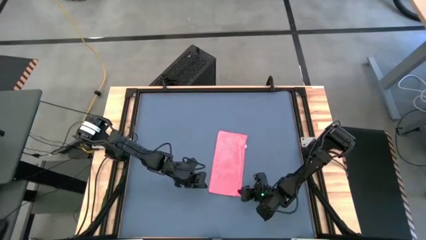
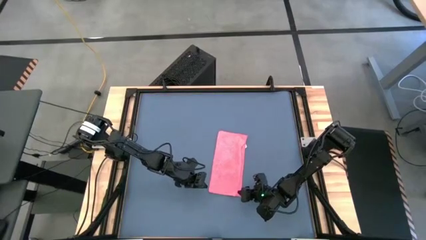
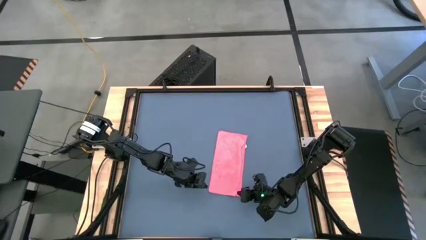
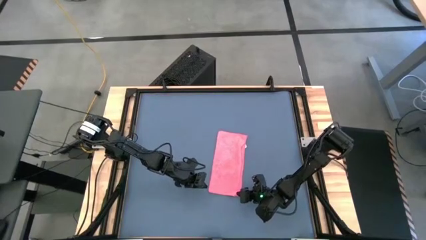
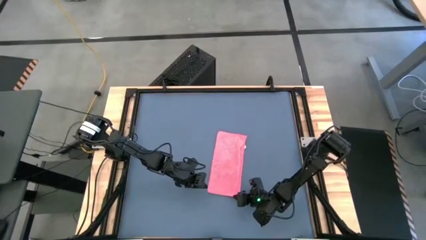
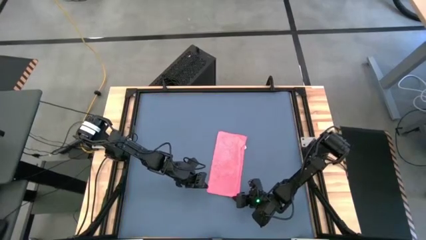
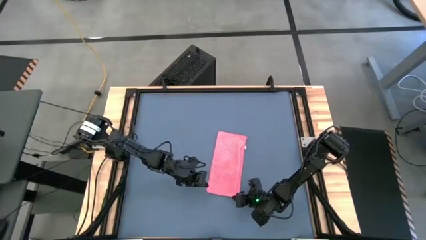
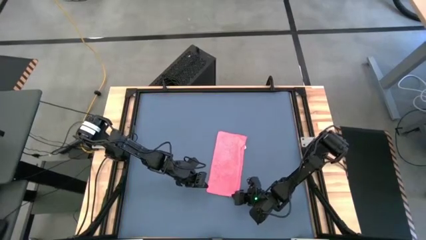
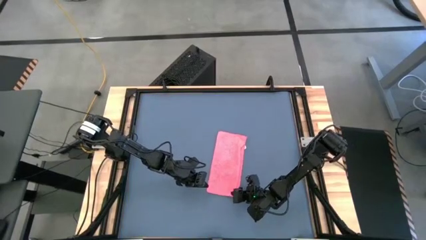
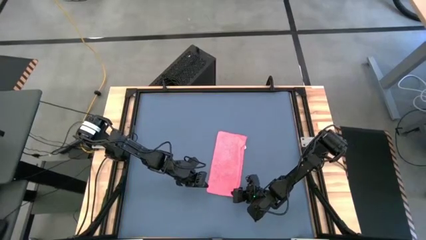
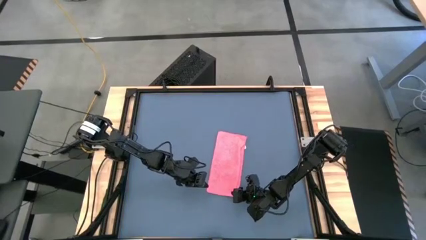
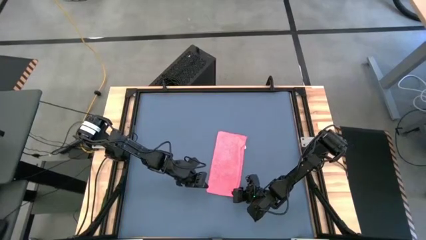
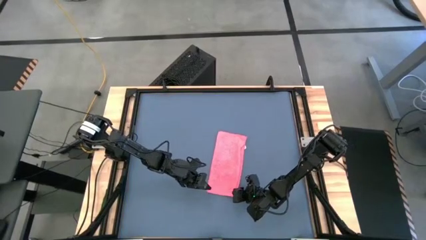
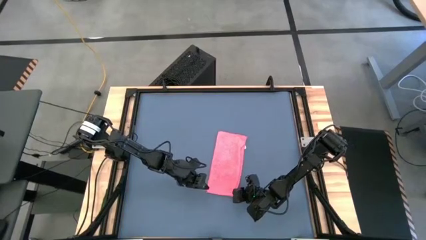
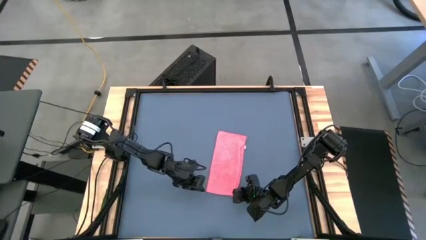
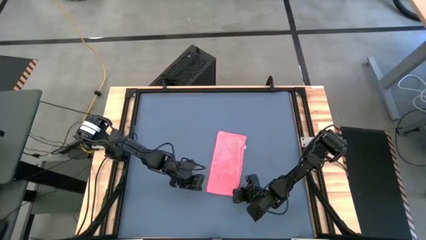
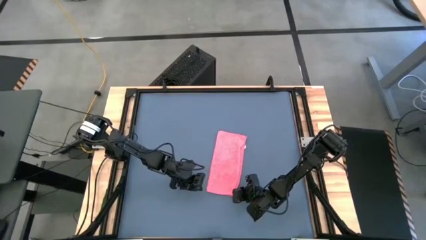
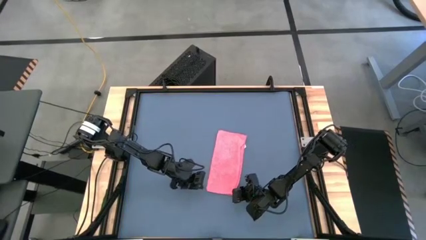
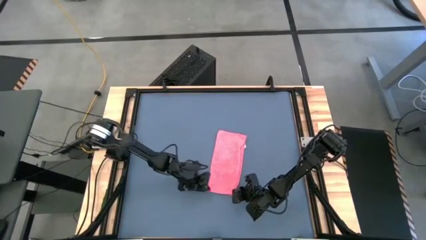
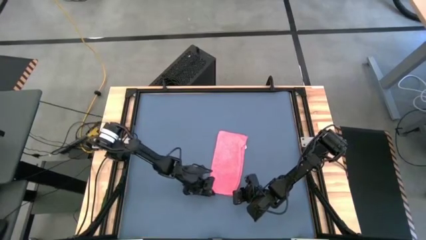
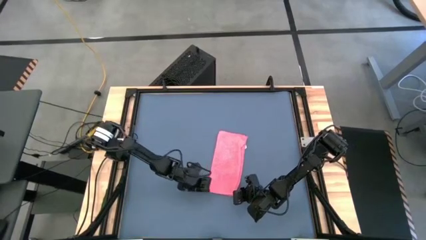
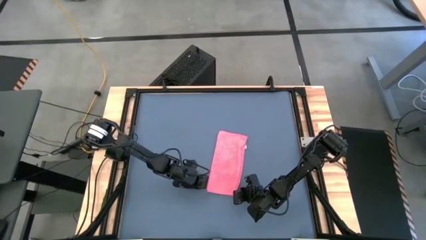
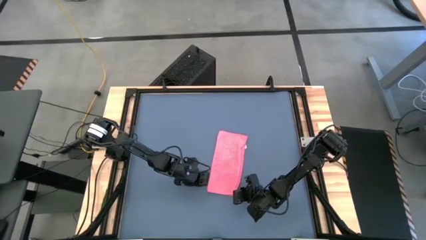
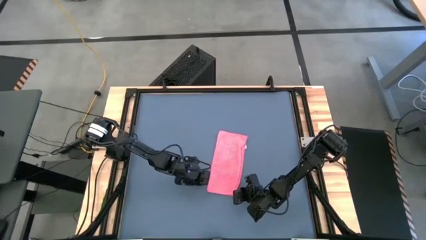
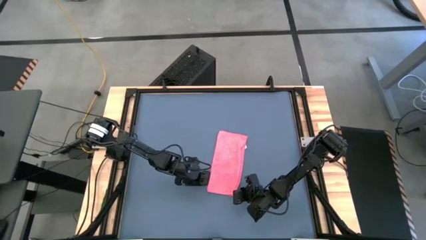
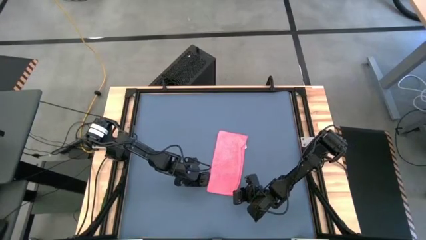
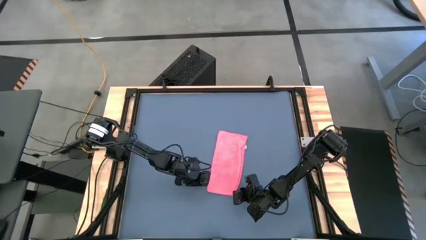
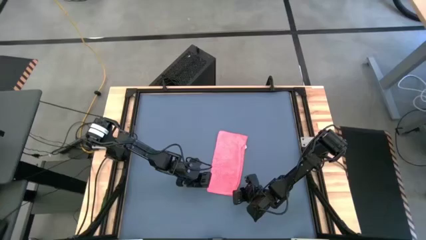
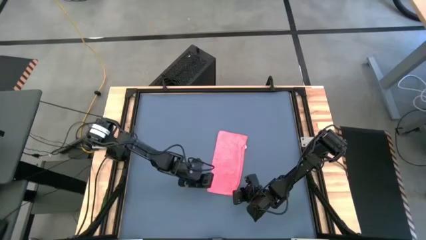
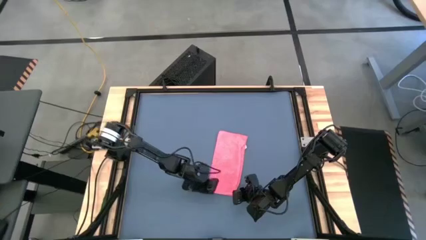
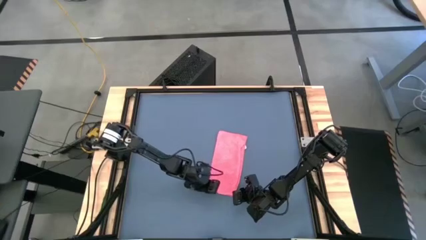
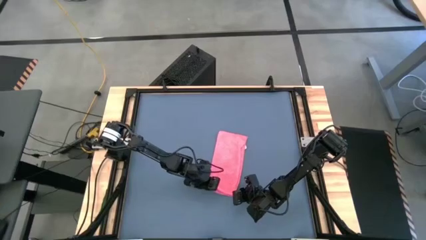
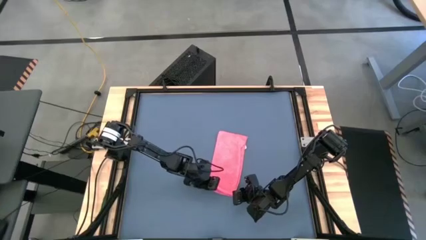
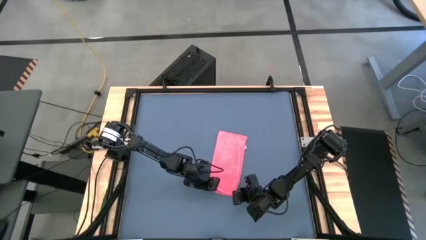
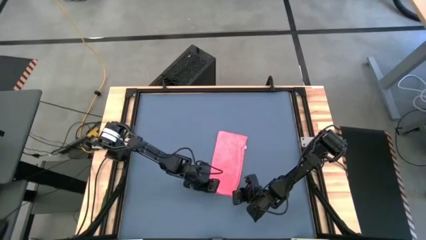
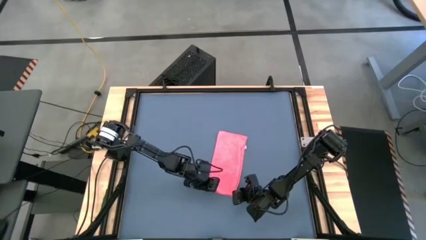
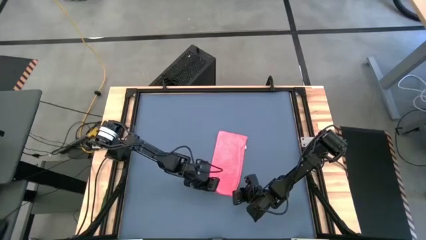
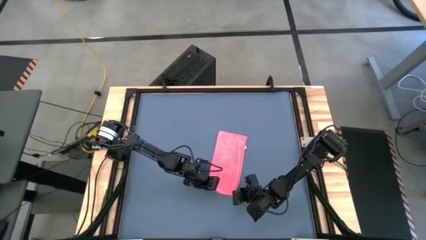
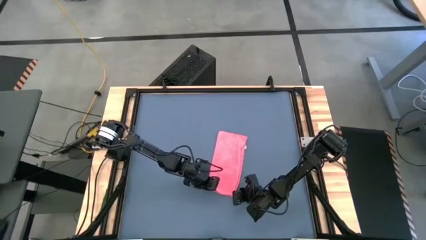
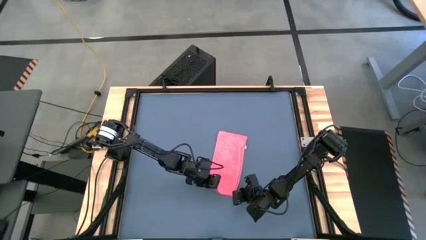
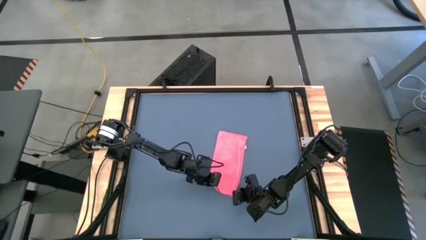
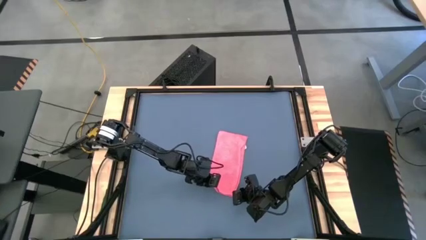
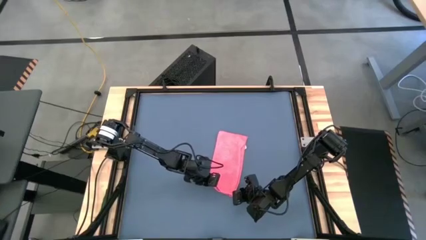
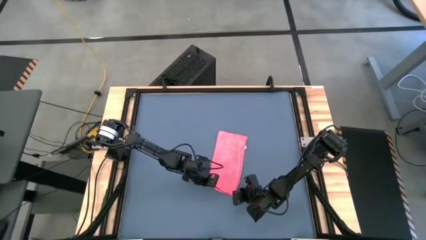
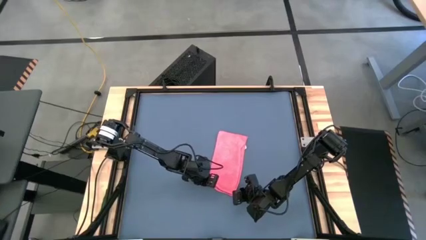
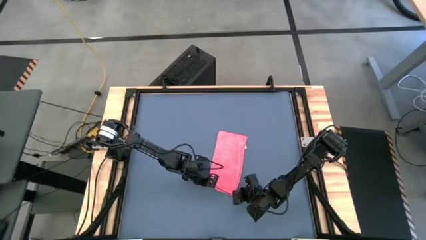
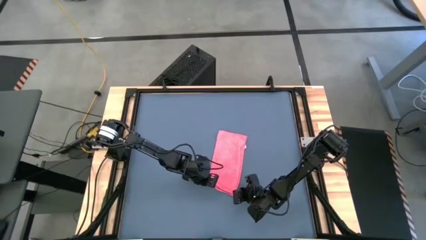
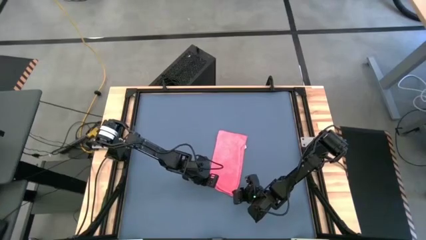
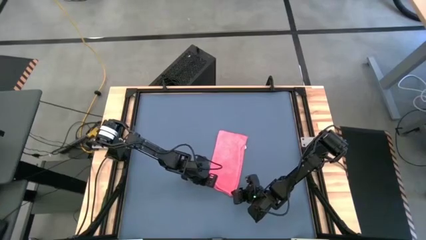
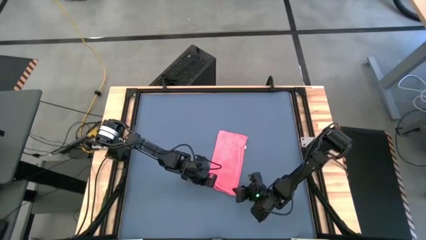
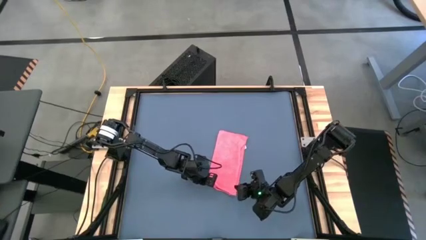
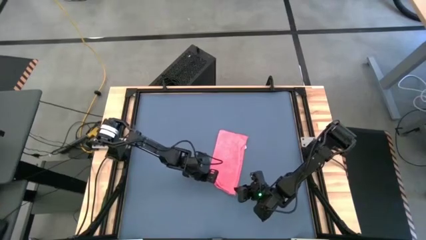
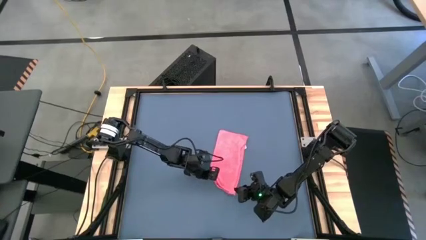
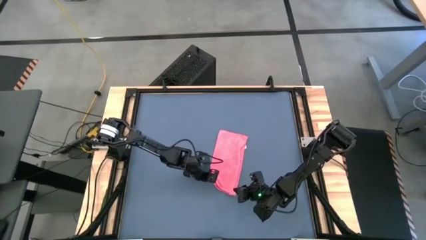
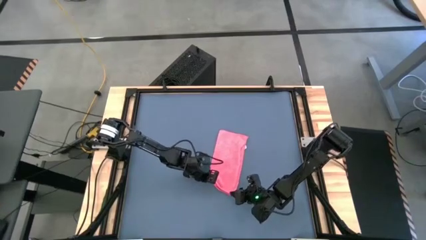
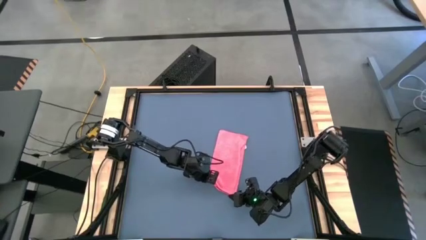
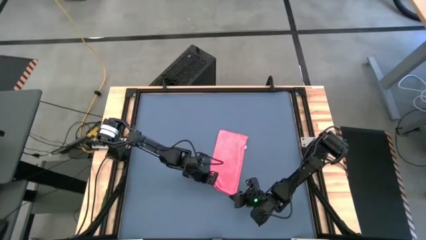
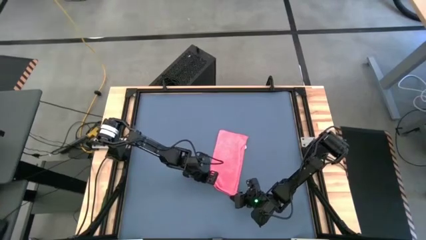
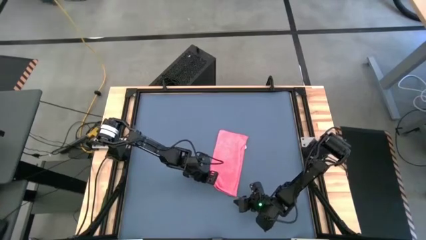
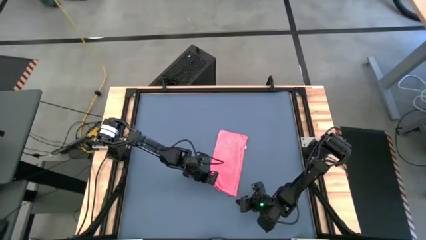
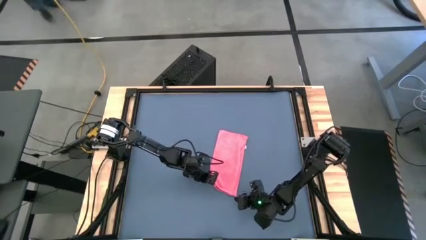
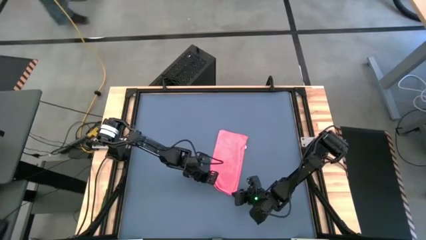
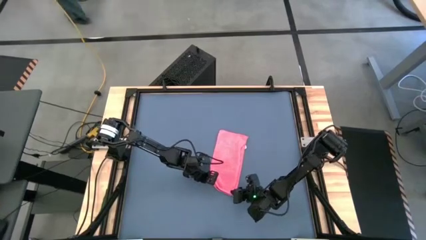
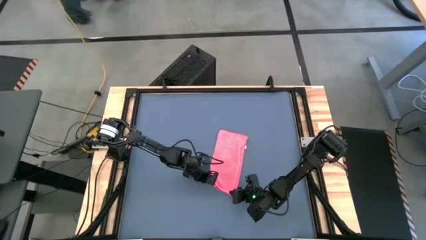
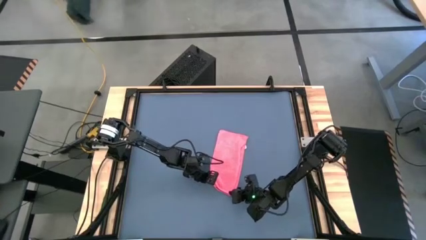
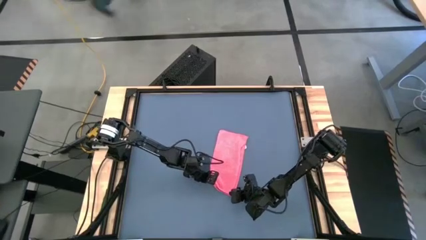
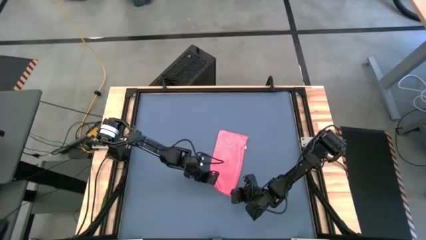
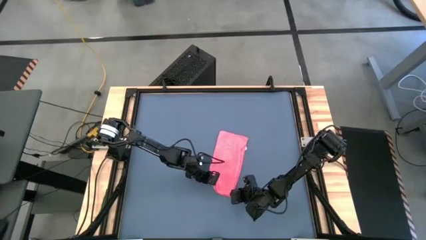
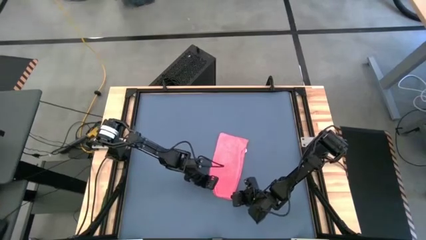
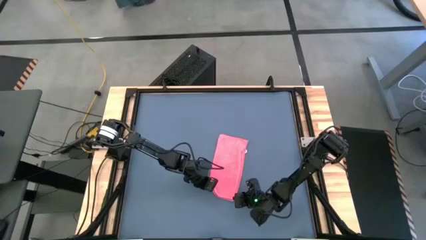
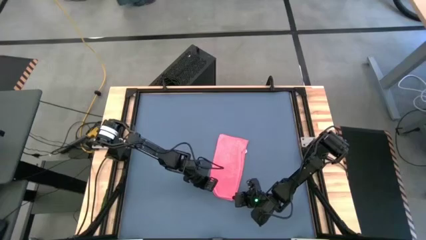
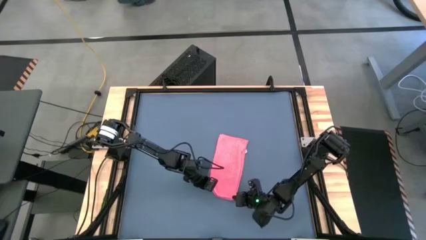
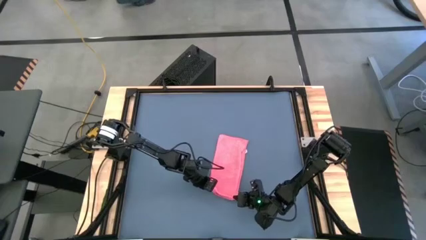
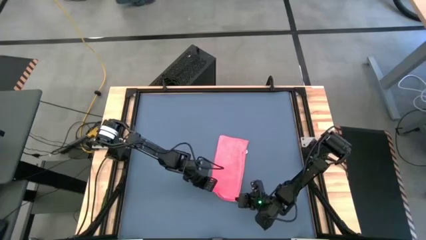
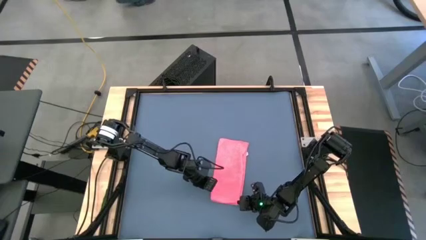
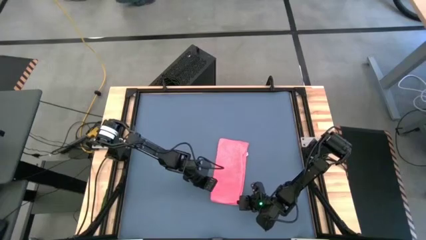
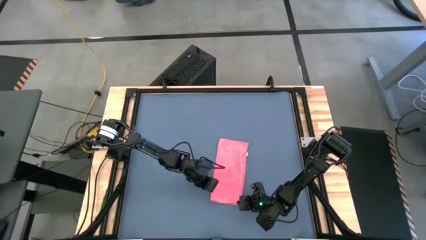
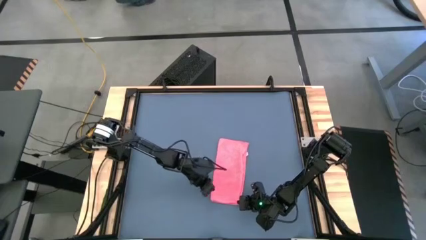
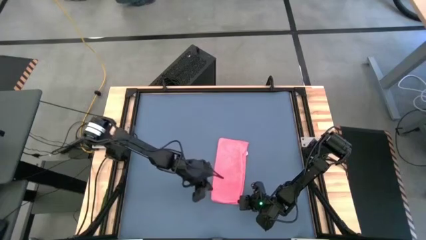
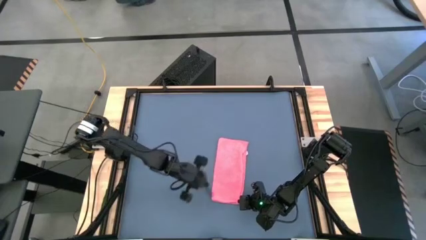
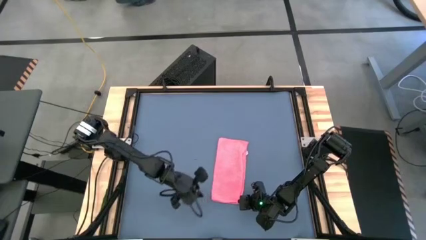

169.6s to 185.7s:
Task: Roll towel
Roll the pink microfiber towel
